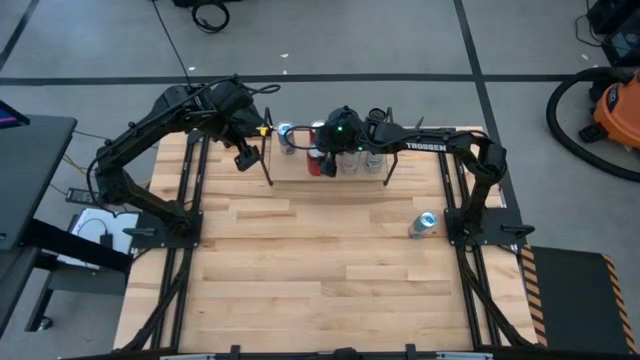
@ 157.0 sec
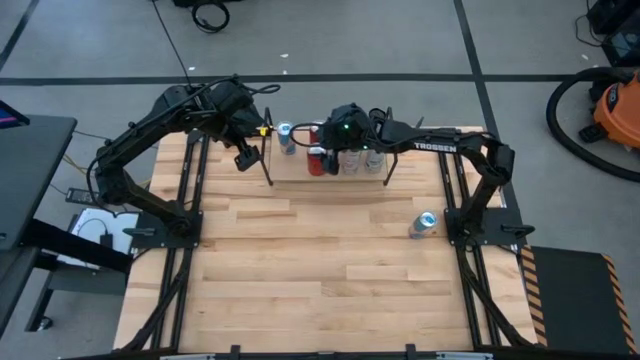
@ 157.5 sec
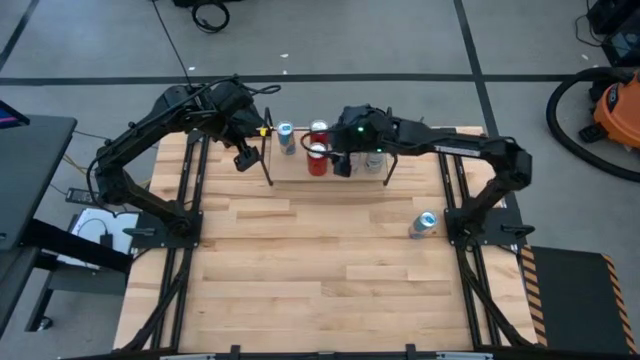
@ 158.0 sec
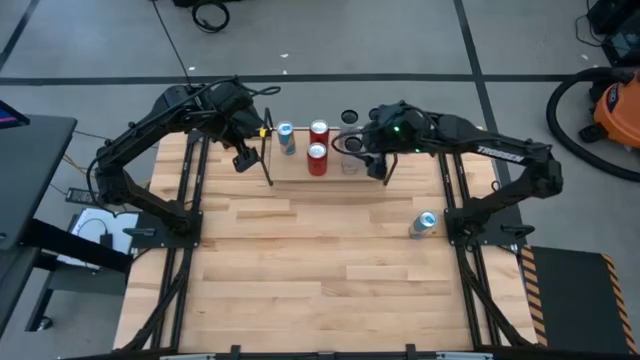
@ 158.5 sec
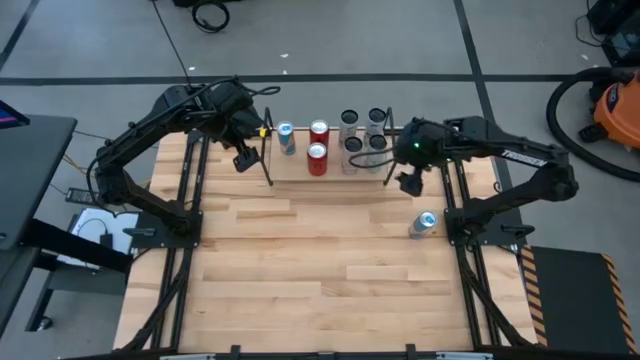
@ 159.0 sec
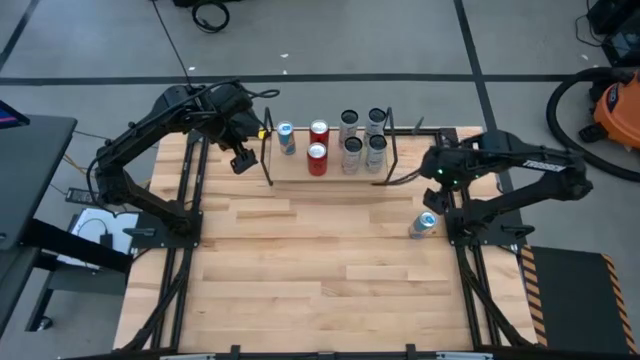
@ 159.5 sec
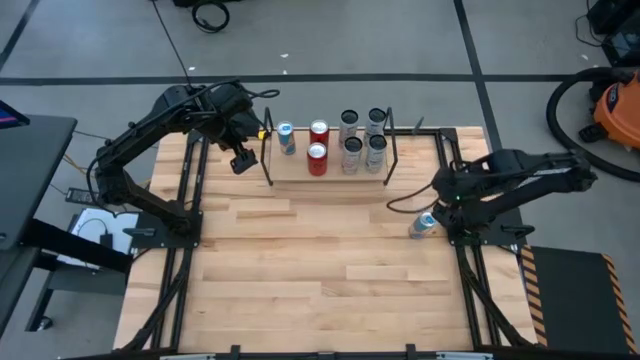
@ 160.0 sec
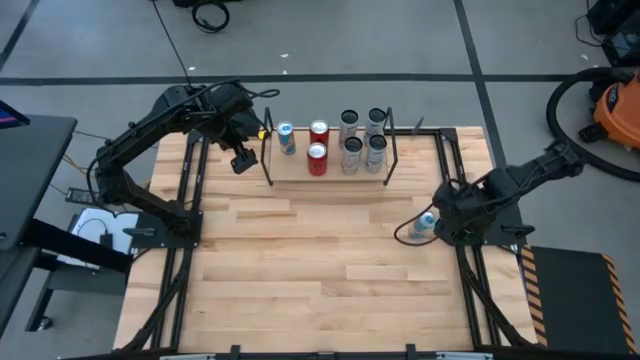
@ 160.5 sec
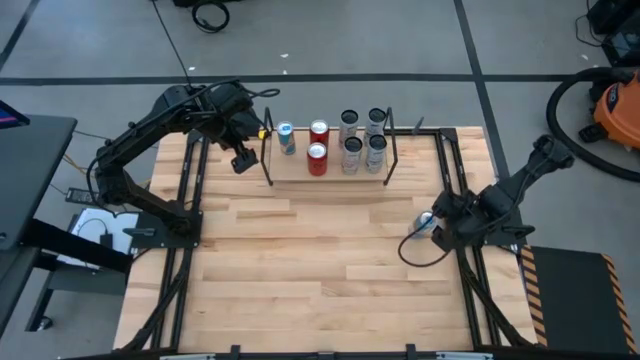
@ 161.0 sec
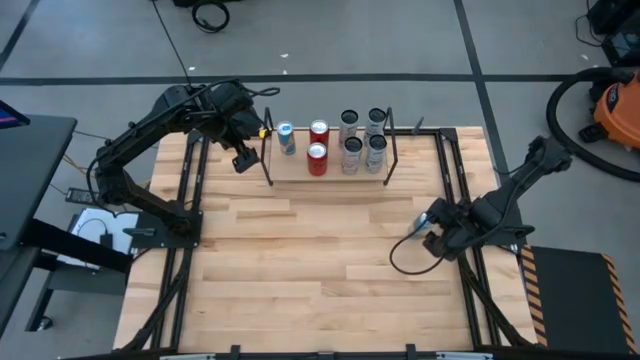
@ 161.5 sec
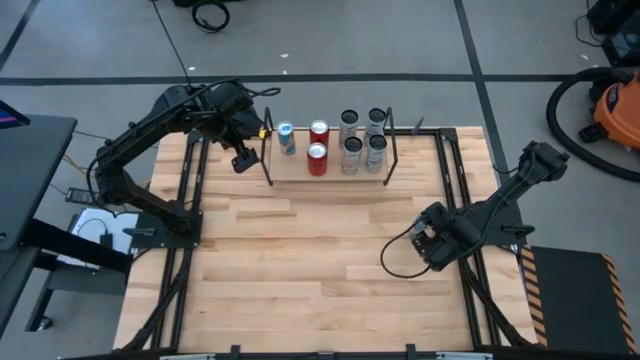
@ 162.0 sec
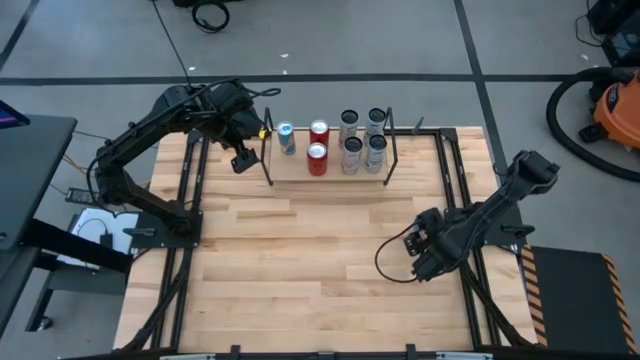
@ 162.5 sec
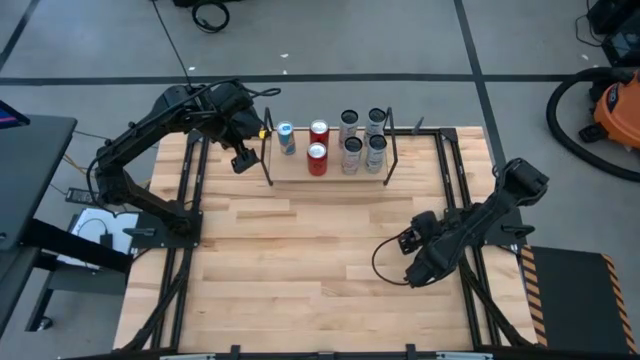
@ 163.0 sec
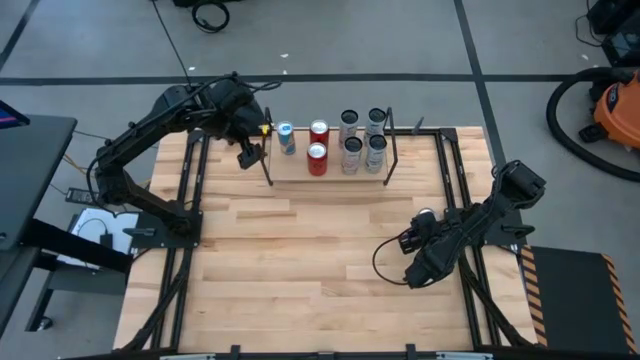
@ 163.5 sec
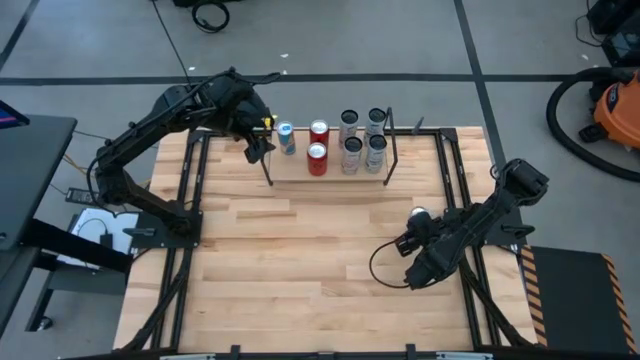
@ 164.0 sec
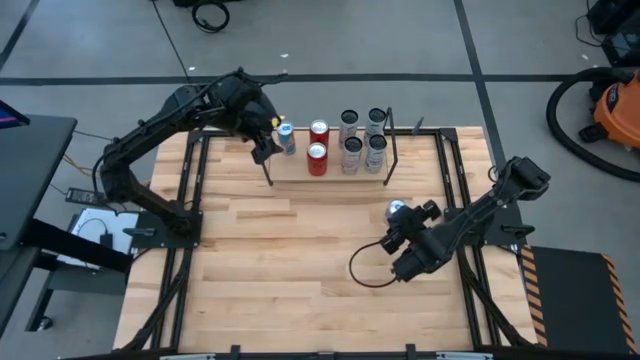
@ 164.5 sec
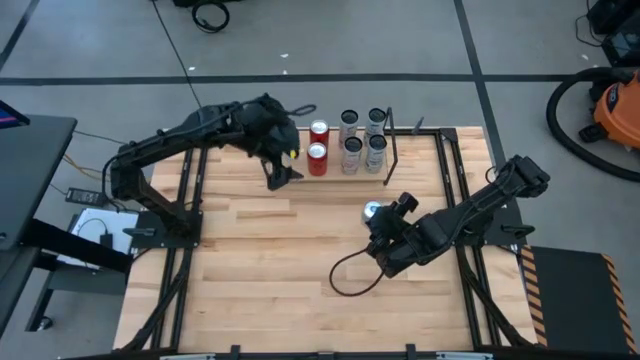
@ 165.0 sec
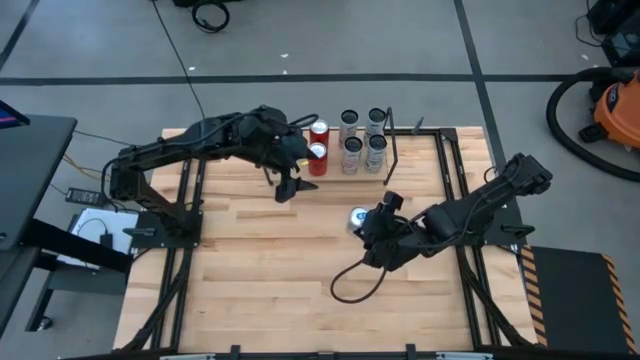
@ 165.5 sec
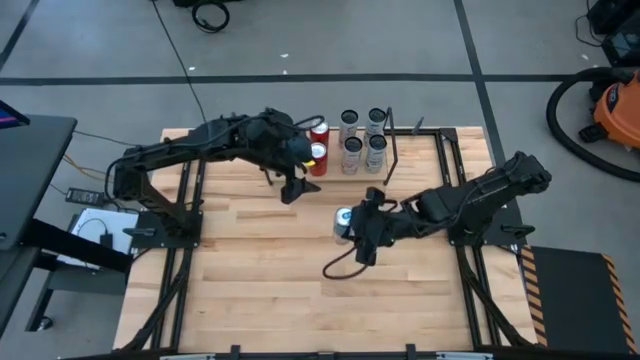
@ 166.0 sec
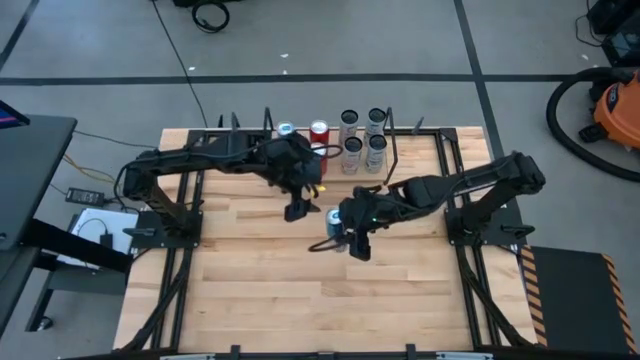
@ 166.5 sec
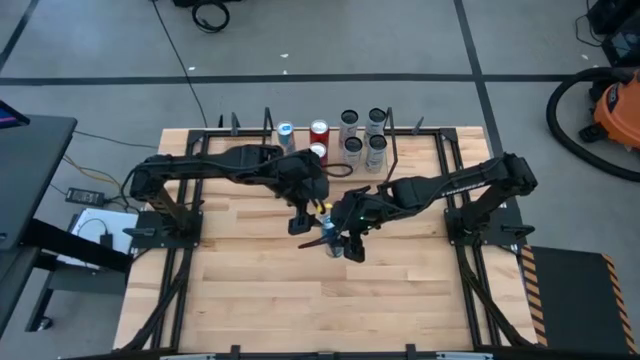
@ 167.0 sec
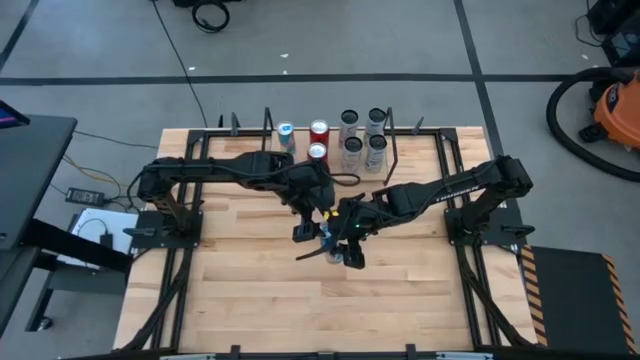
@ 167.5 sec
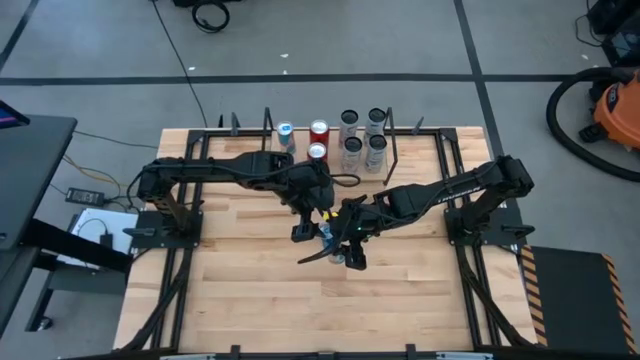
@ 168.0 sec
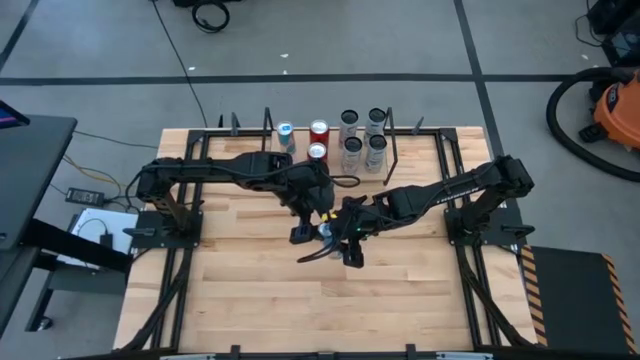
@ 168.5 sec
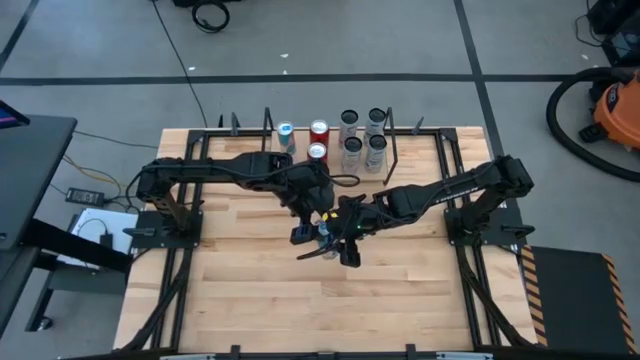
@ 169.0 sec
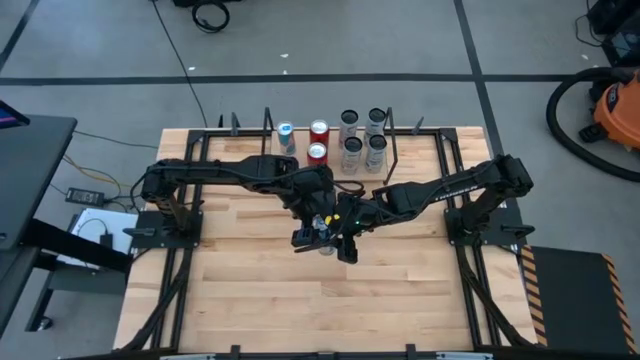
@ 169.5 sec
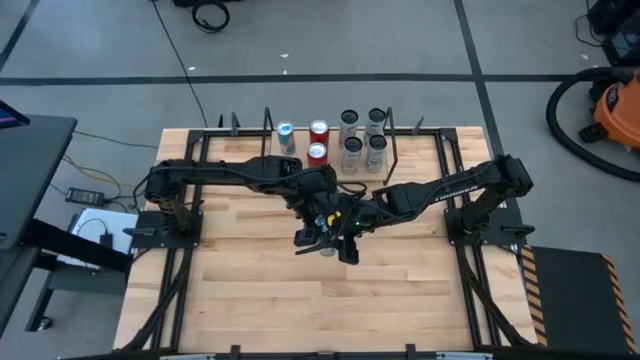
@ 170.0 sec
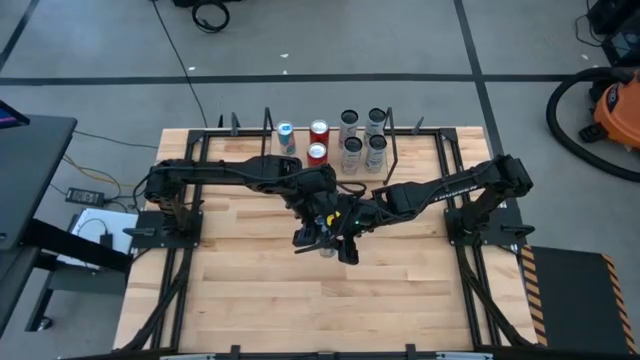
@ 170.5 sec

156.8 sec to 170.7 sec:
Task: Place canned beverage on shelf
Put the blue soda can on the shelf aligned with the other blue soda can

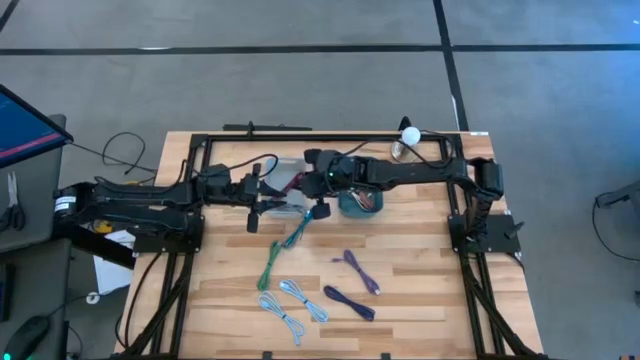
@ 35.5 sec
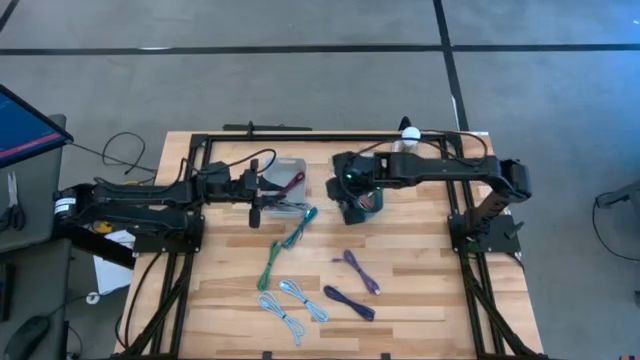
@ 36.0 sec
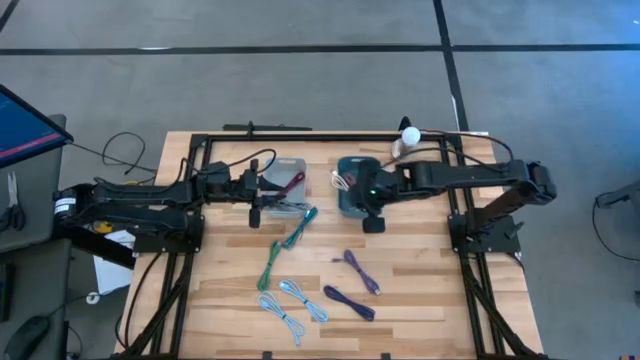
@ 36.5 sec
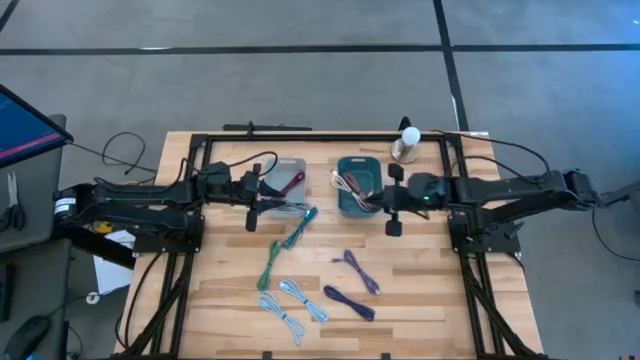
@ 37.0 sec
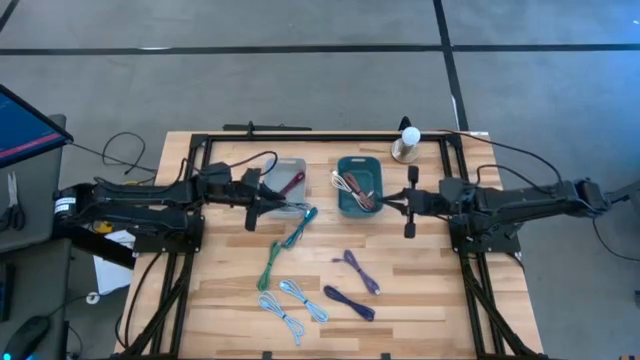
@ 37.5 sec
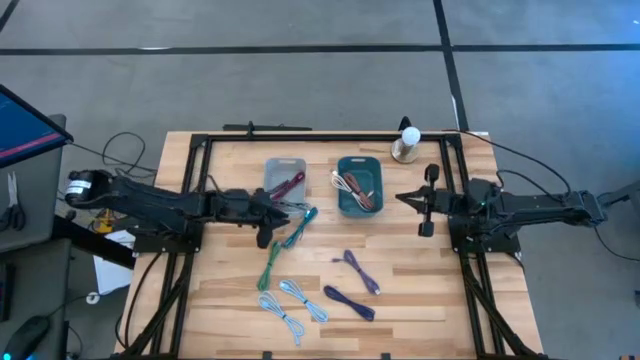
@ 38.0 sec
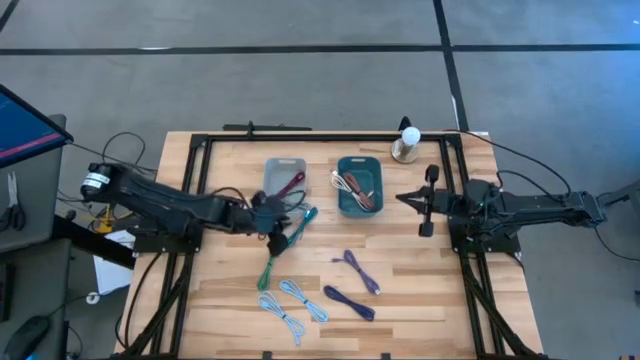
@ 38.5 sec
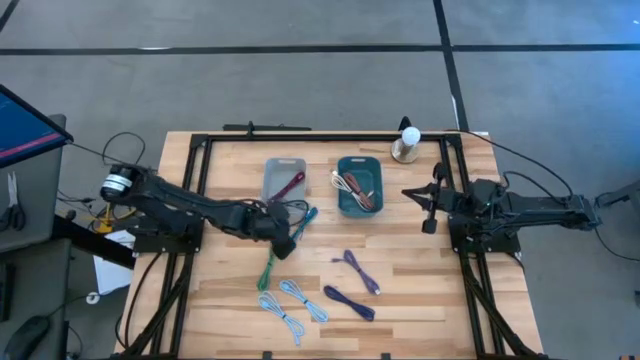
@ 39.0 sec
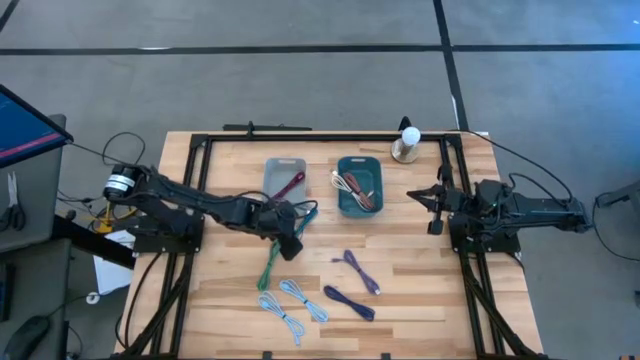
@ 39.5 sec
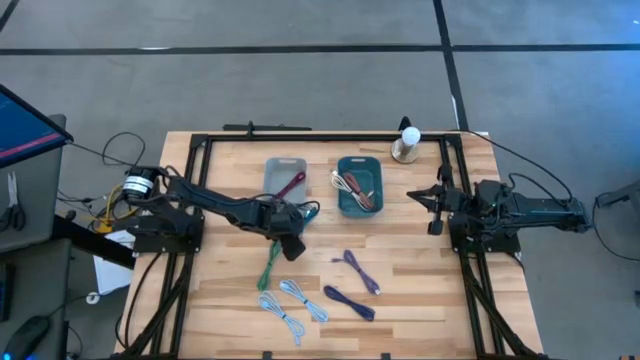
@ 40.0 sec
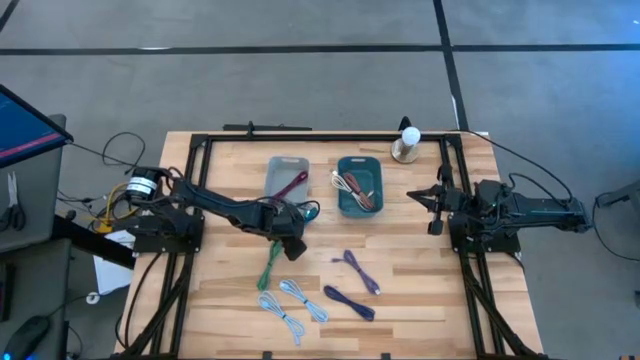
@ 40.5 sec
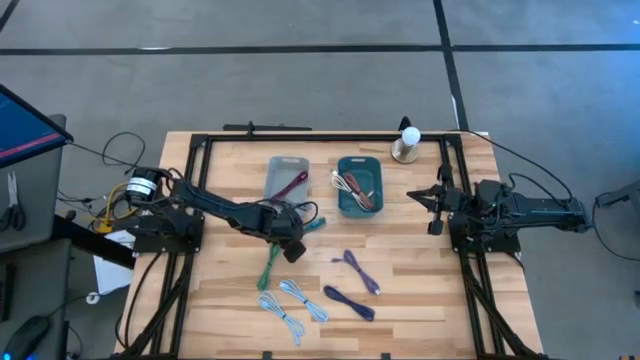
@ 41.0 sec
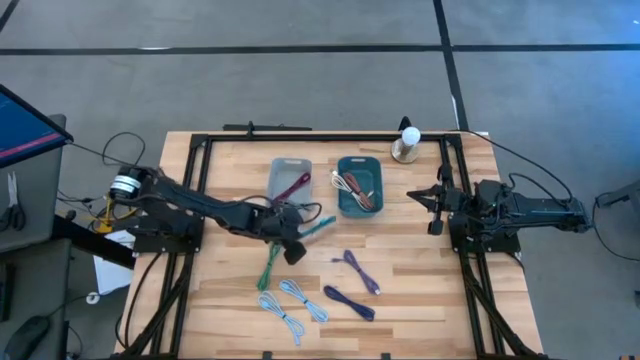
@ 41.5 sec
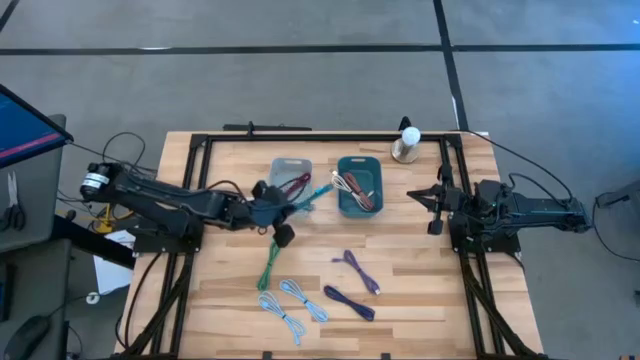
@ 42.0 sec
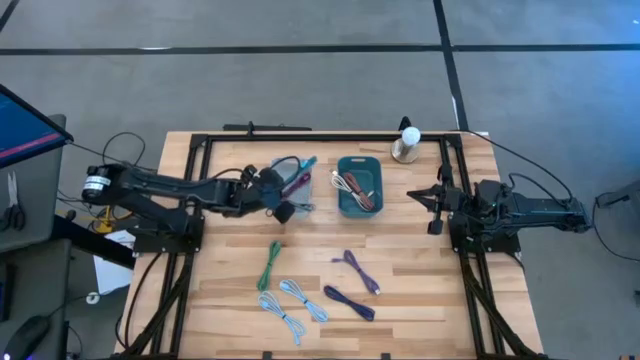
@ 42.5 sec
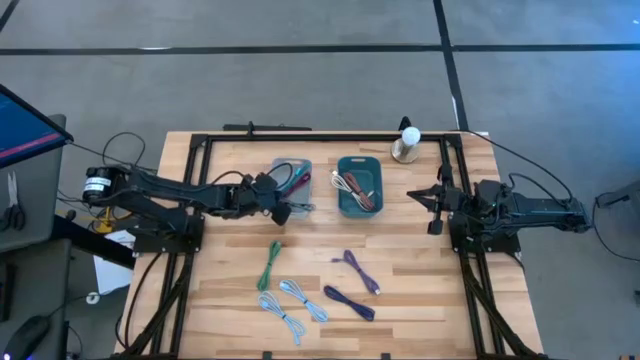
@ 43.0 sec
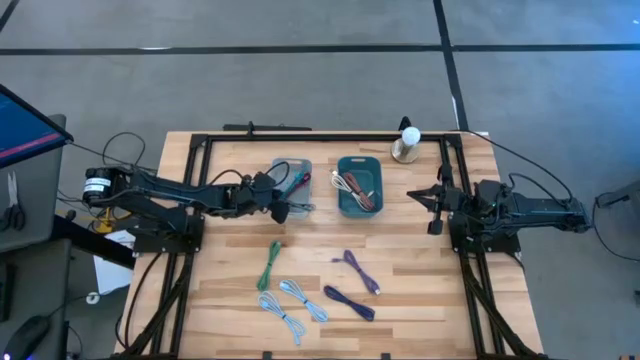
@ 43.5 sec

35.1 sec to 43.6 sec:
Task: Pick & Place USB Port
Put the blue patterned charger cable into the white bin
